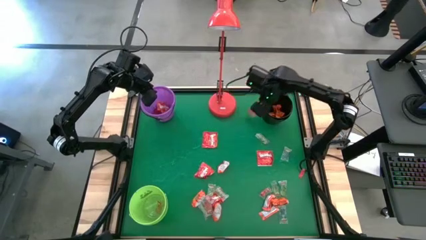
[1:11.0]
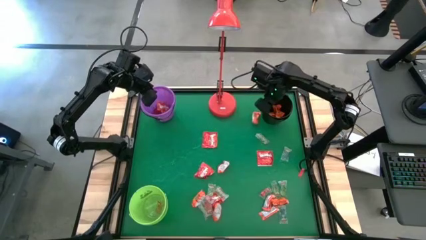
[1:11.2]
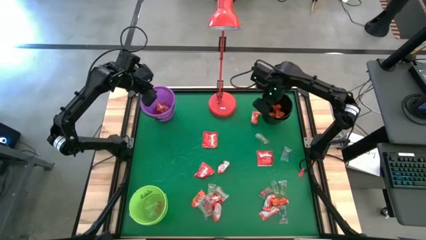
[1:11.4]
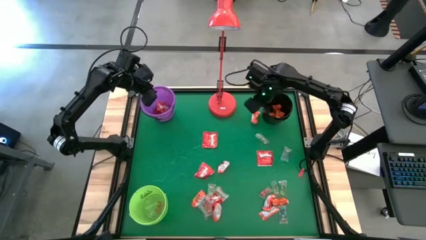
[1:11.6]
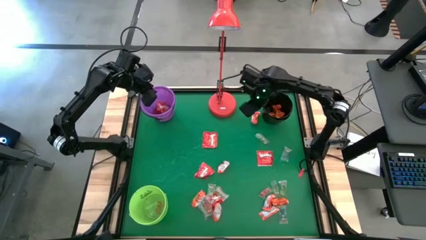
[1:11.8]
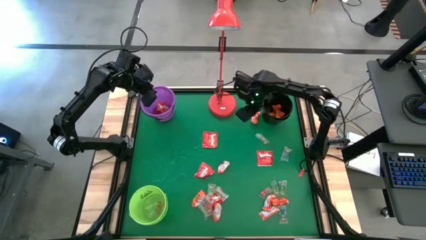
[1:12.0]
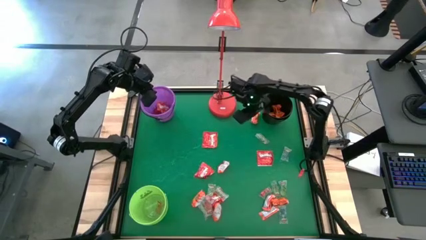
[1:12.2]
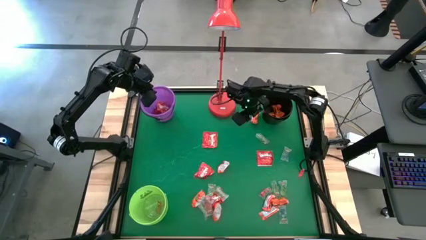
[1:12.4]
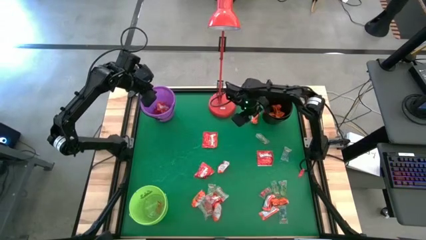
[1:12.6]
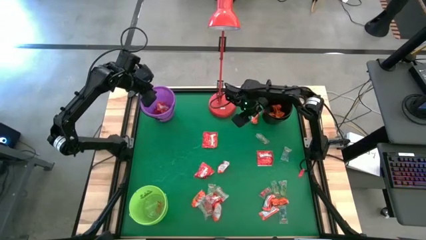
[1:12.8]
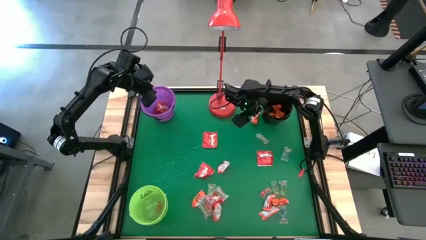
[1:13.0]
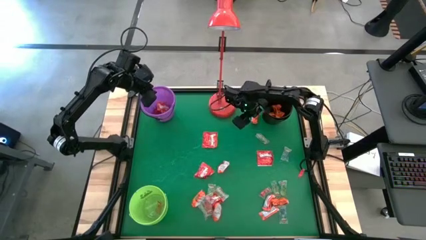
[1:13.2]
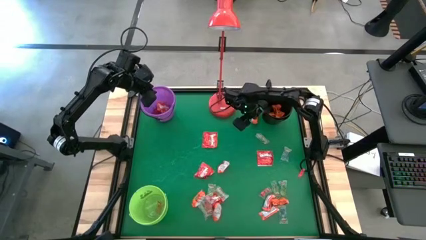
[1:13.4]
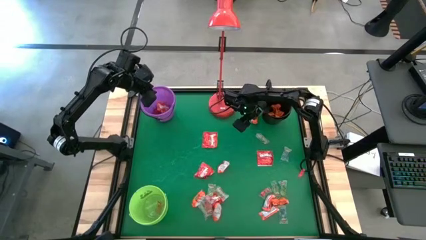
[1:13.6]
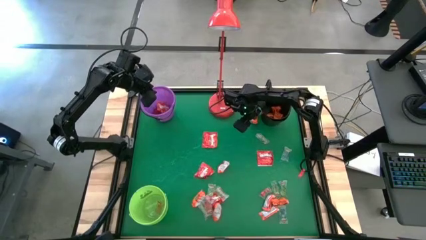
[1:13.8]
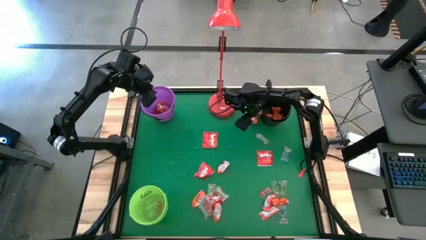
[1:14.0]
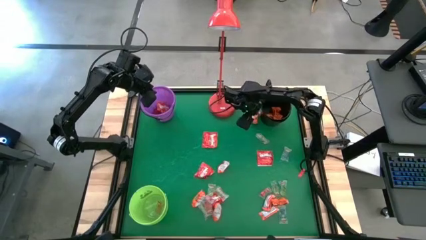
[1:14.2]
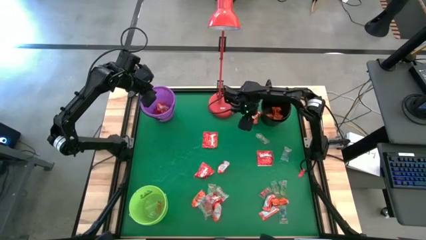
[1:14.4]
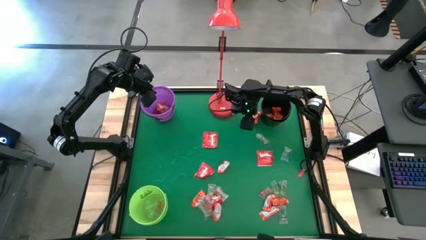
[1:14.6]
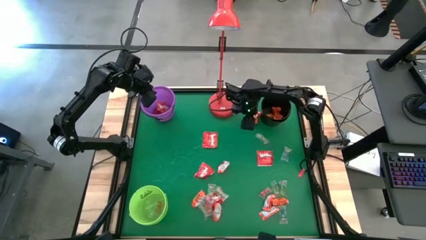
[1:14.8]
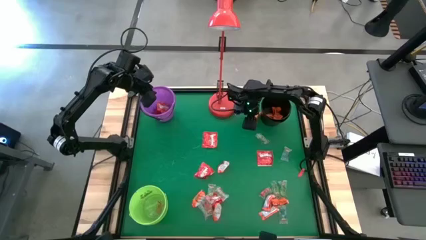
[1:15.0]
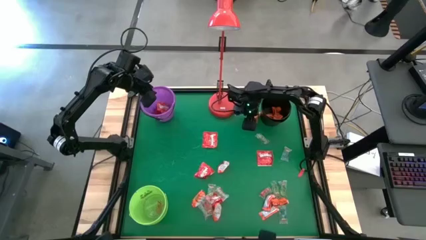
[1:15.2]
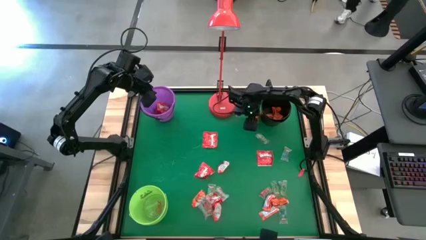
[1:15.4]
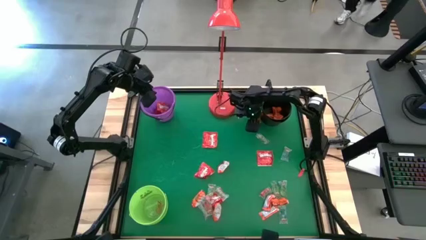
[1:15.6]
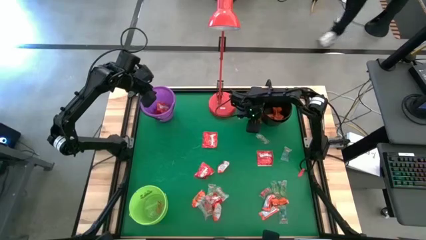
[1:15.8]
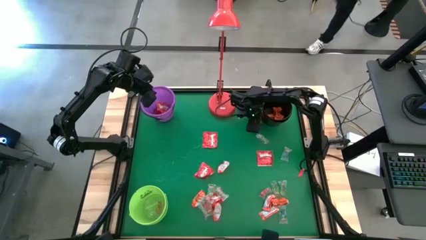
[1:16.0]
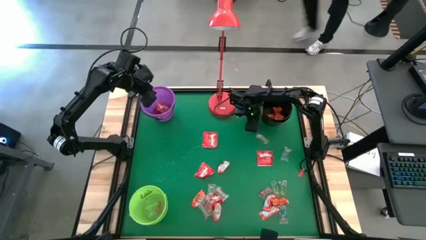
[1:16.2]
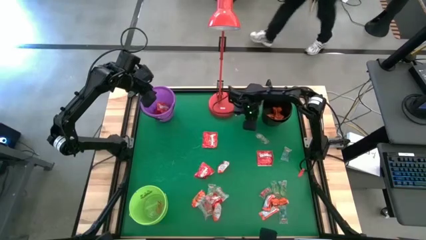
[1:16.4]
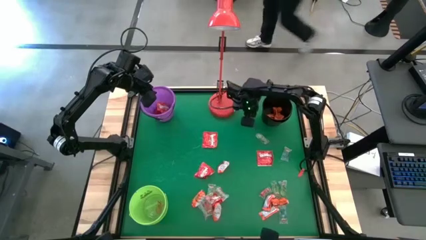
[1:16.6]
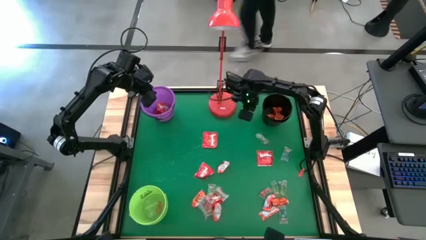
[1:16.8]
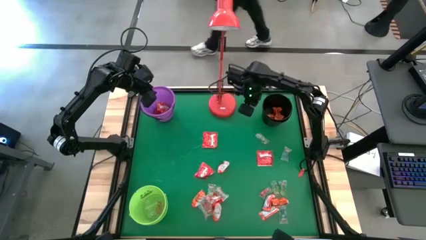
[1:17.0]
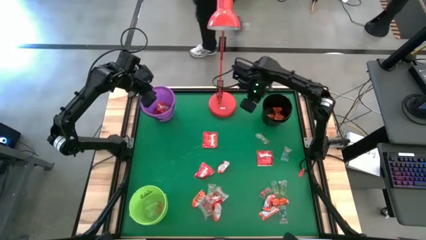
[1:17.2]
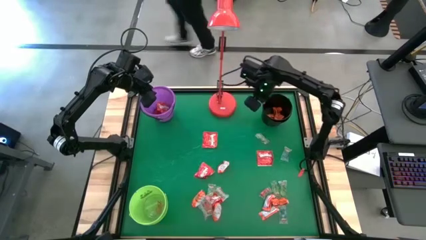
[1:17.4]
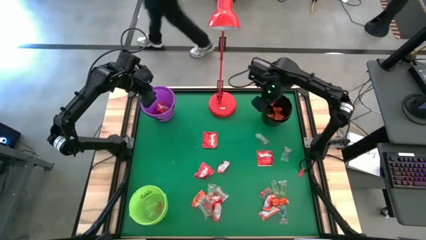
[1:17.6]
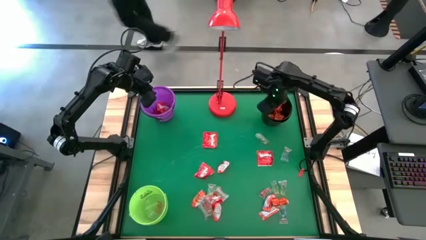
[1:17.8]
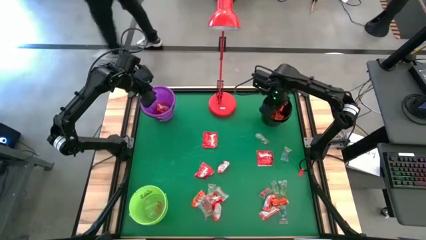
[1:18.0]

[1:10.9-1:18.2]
Task: Sort candy
Put the orange chocolate into the black bucket

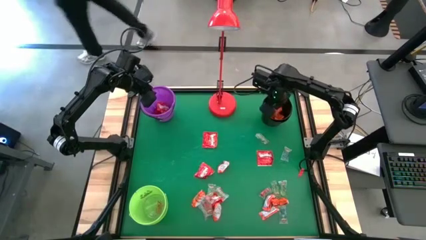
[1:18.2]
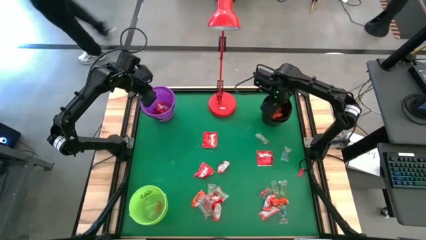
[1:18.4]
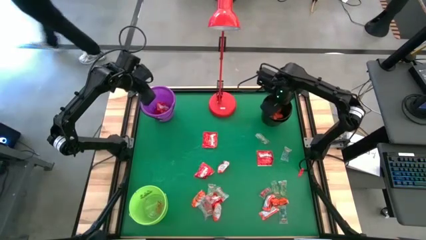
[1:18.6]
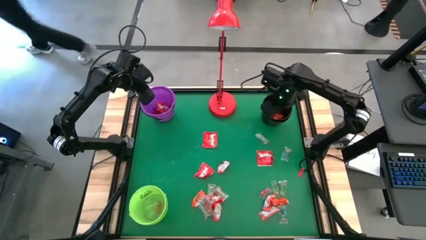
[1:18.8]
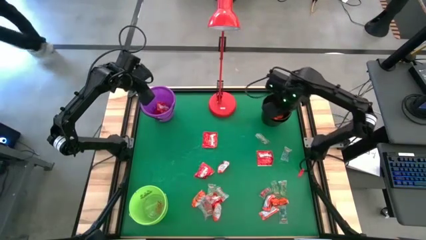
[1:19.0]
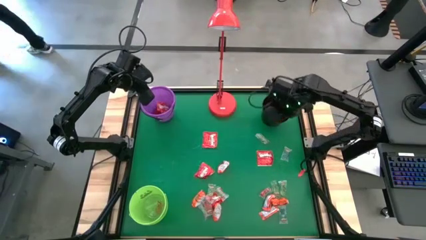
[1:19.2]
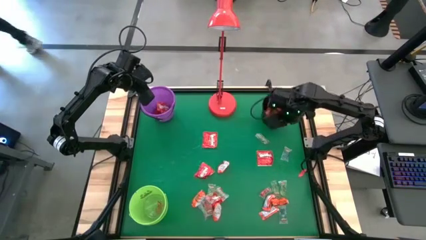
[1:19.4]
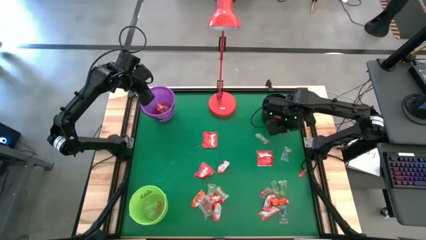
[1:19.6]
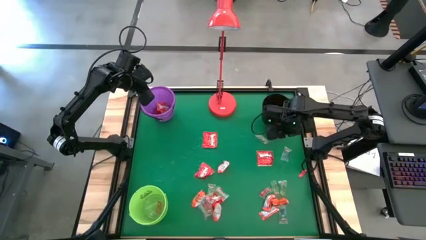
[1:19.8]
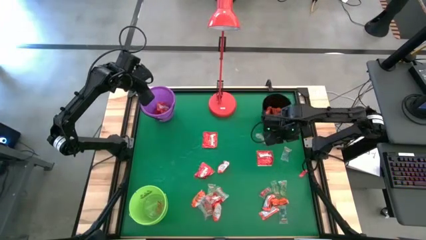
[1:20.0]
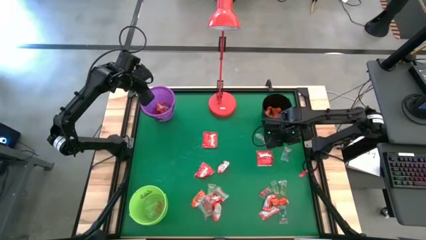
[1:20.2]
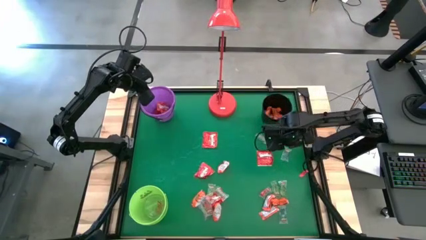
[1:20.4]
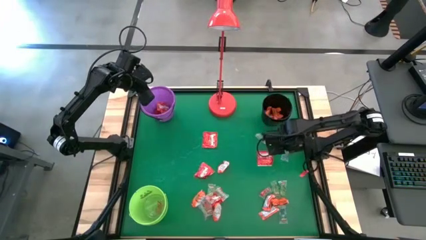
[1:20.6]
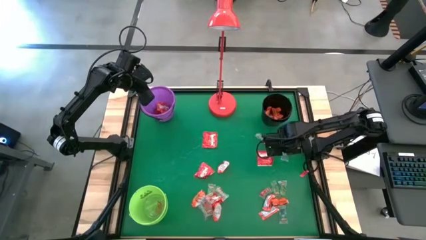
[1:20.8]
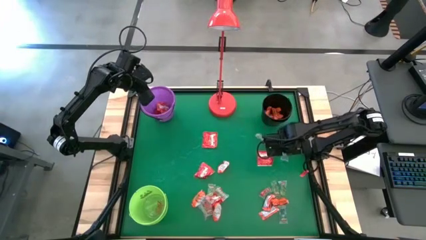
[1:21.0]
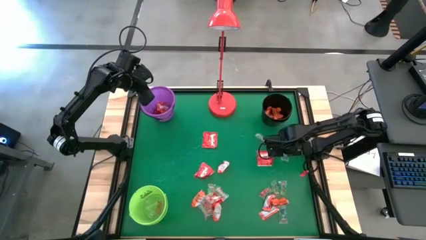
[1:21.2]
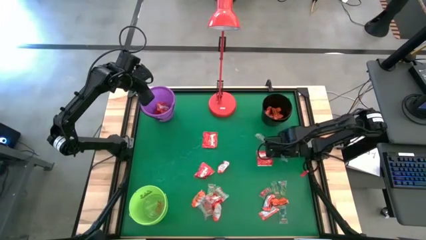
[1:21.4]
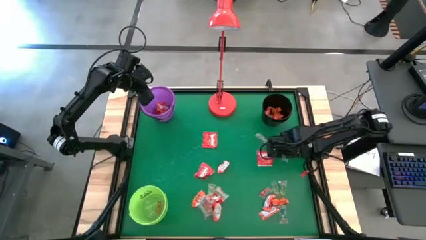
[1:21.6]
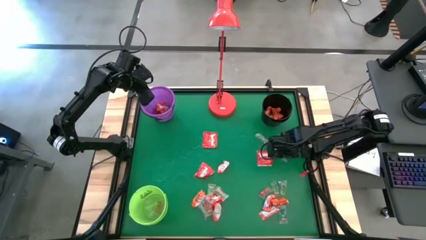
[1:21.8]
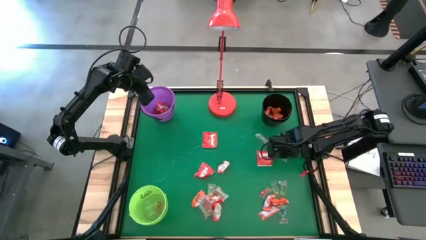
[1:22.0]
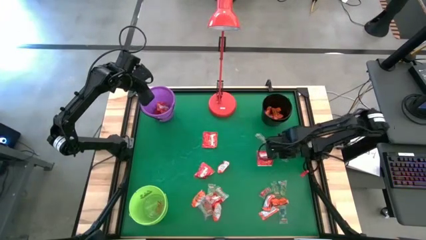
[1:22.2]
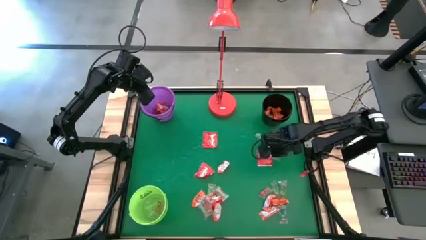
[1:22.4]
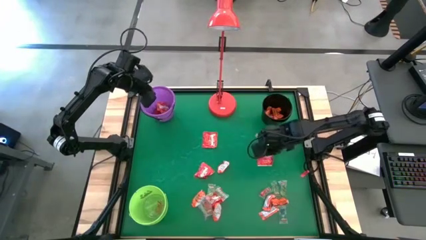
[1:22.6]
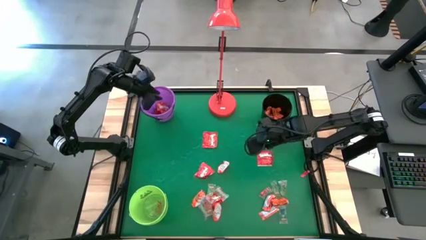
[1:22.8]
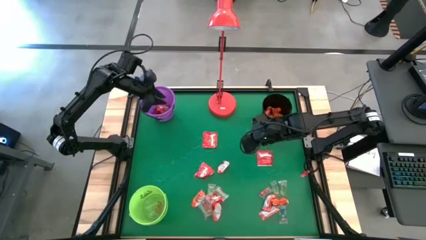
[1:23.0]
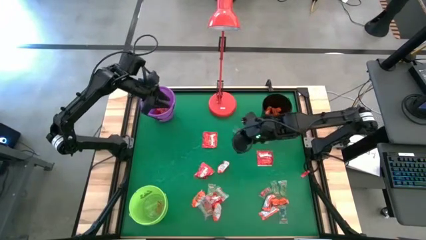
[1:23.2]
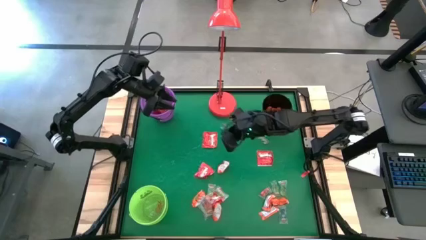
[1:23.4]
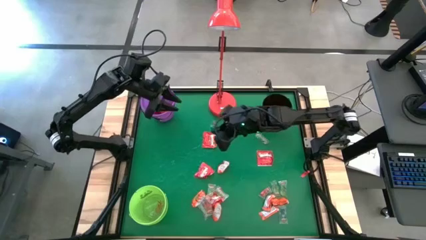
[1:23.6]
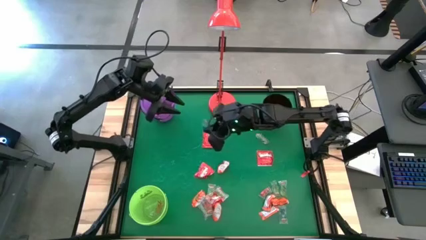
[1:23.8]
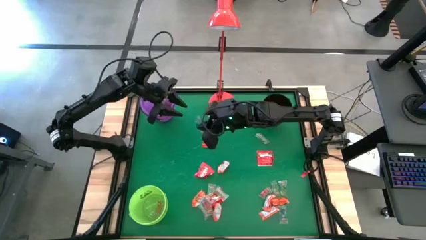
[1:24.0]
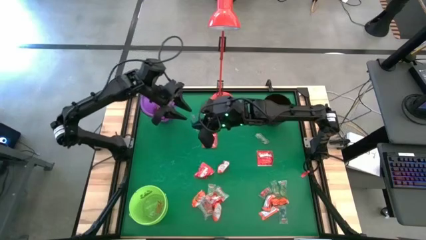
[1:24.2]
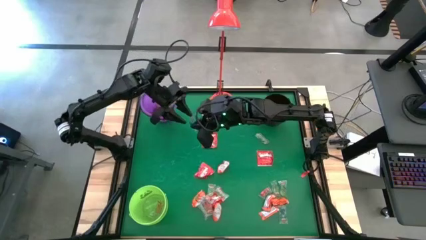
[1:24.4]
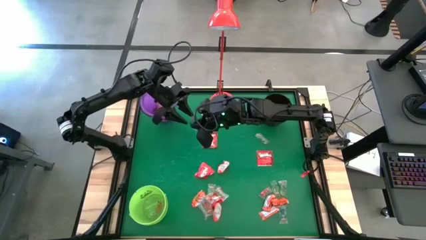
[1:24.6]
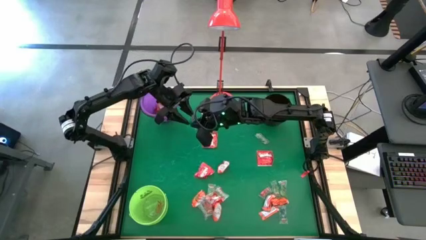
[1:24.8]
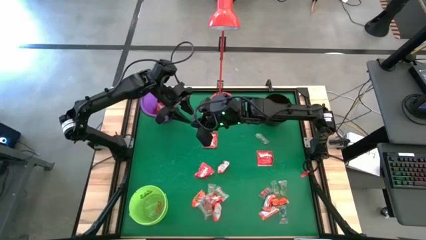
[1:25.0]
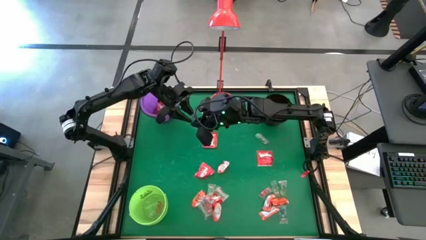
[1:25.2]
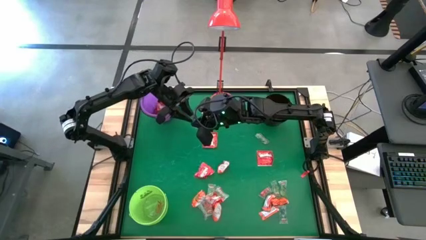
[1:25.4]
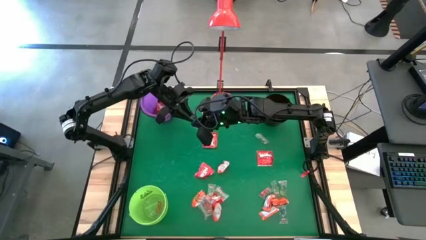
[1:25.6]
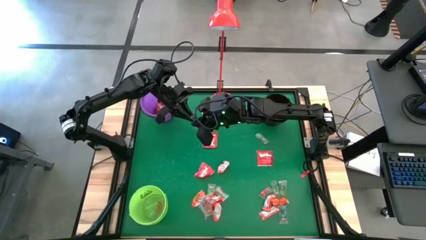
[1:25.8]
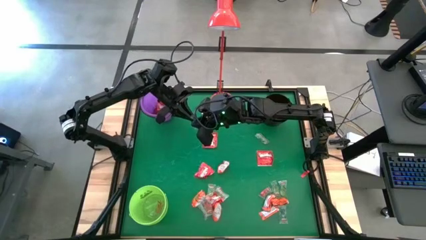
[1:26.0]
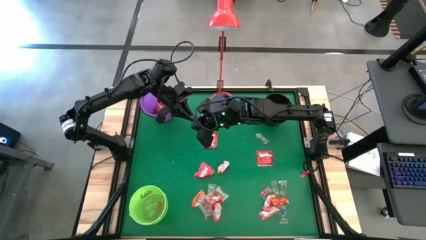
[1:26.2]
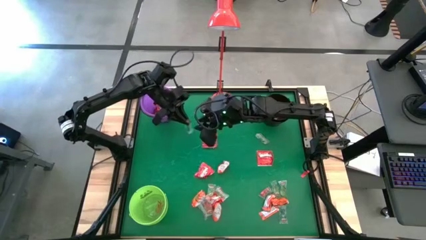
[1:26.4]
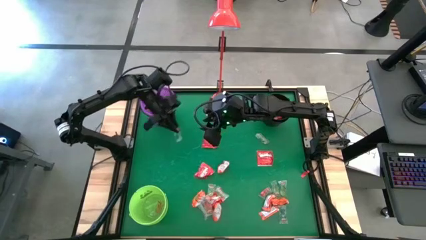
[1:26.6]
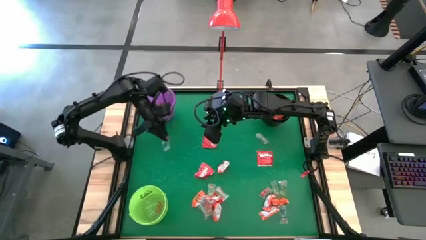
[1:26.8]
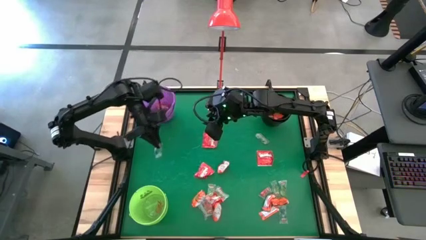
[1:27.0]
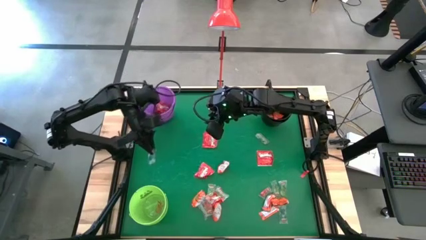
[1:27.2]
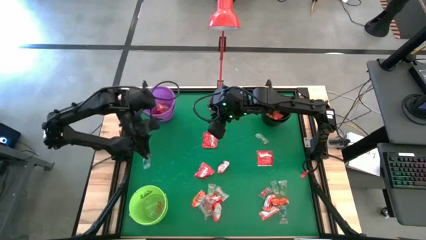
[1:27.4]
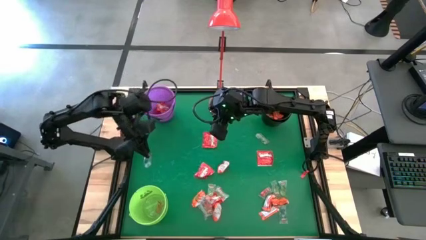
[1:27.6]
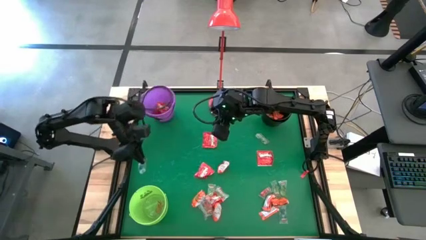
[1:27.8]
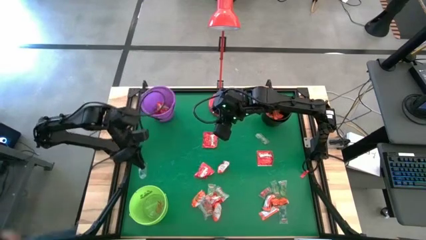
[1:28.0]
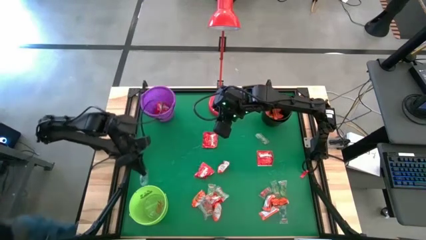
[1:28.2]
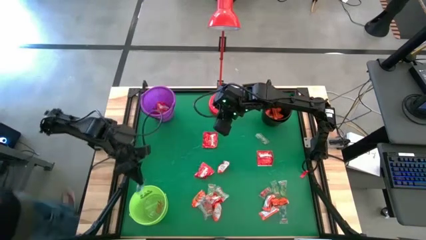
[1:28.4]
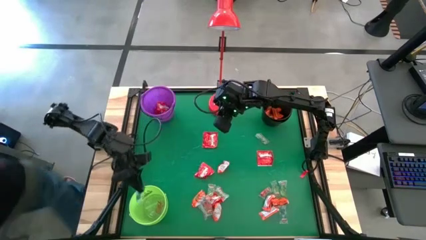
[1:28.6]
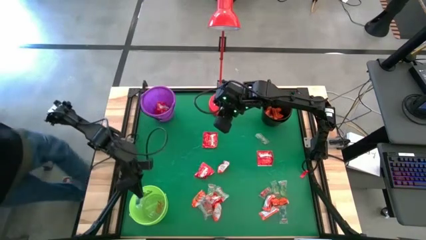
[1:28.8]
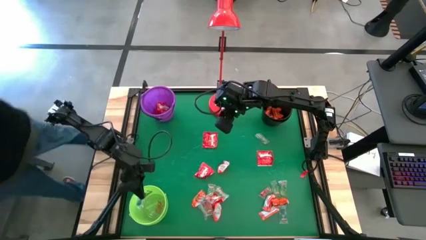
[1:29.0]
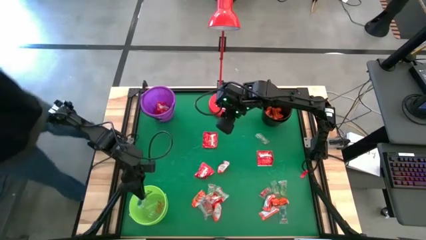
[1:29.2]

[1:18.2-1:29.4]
Put the blue gummy into the light green bucket
